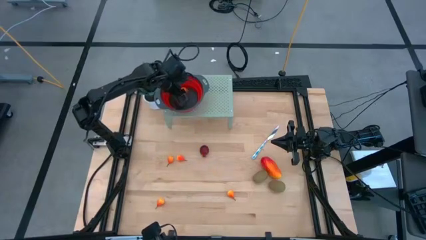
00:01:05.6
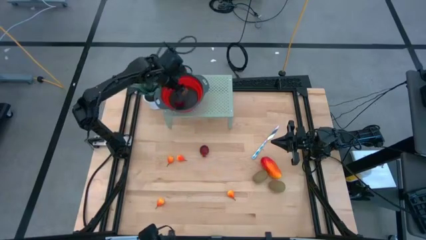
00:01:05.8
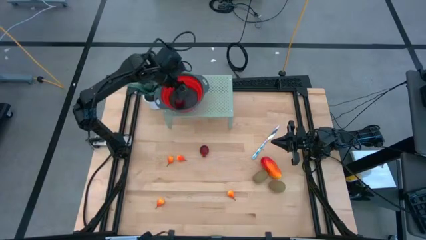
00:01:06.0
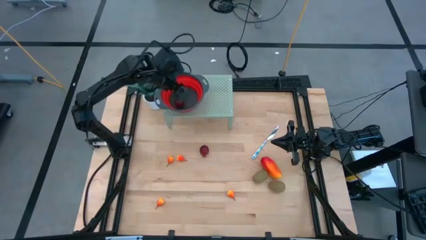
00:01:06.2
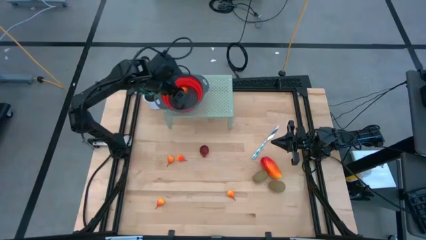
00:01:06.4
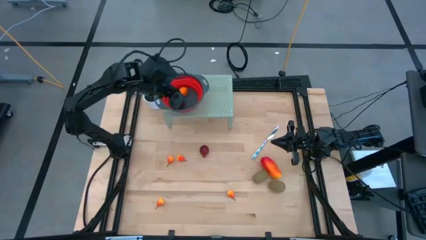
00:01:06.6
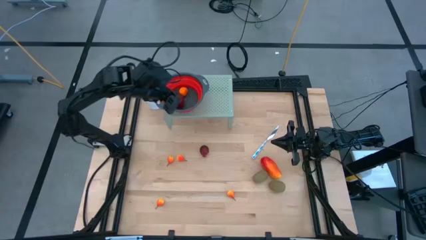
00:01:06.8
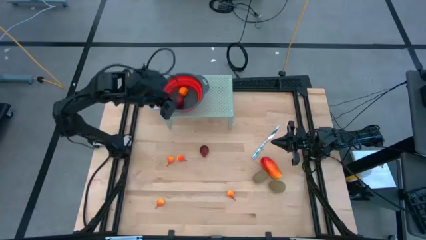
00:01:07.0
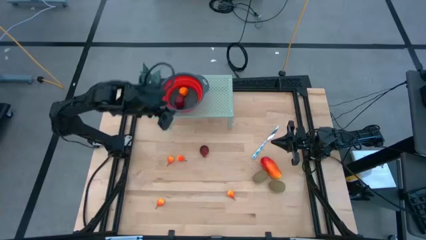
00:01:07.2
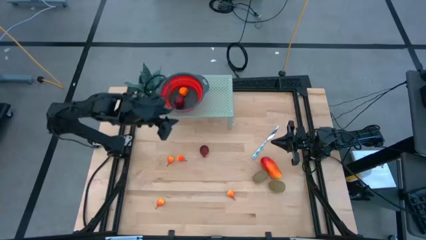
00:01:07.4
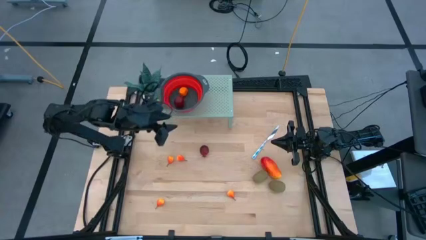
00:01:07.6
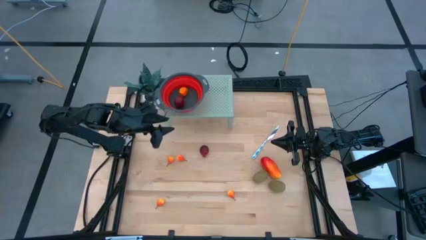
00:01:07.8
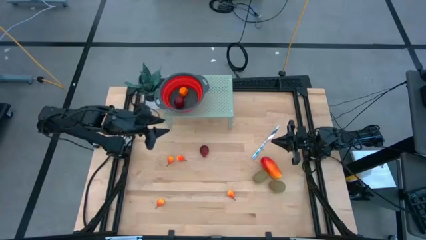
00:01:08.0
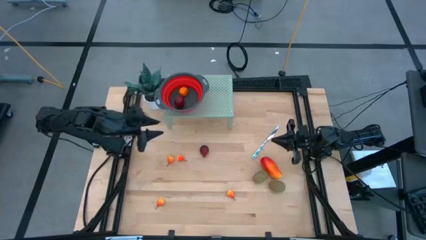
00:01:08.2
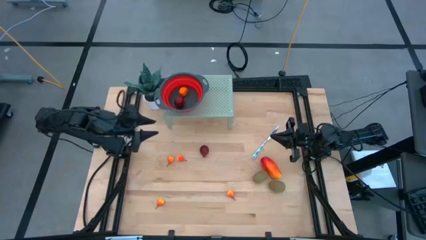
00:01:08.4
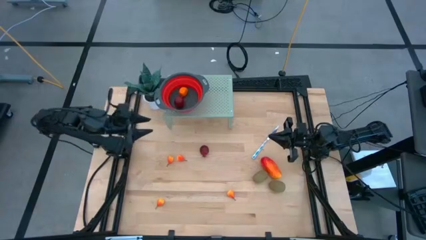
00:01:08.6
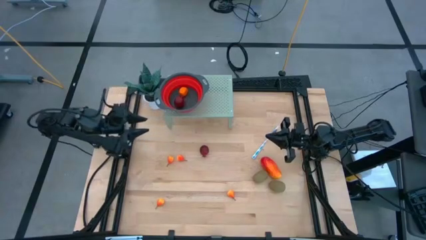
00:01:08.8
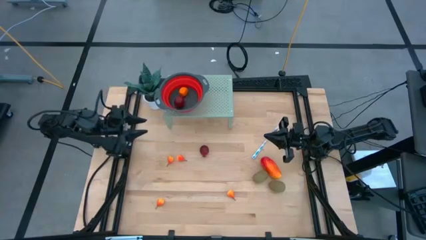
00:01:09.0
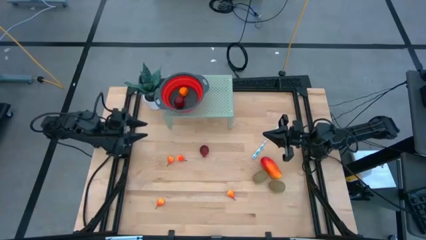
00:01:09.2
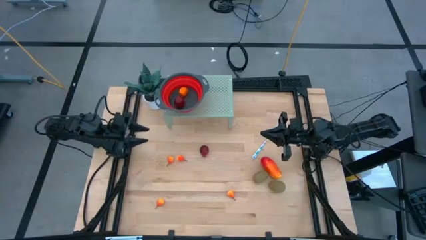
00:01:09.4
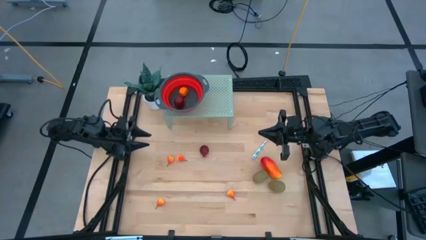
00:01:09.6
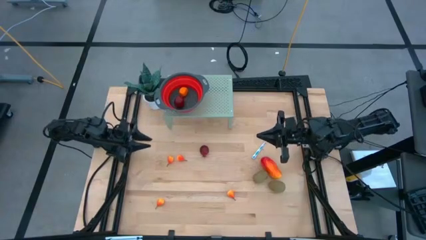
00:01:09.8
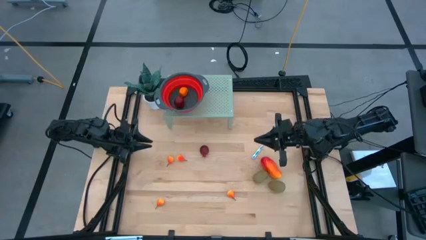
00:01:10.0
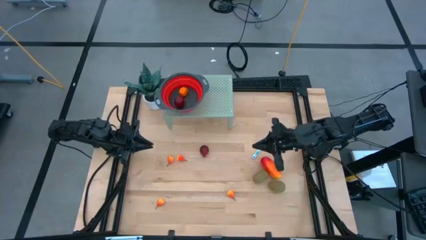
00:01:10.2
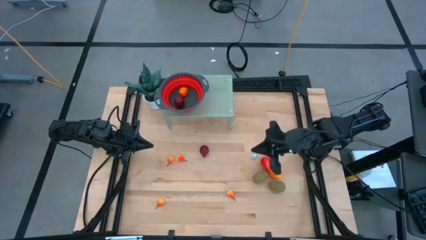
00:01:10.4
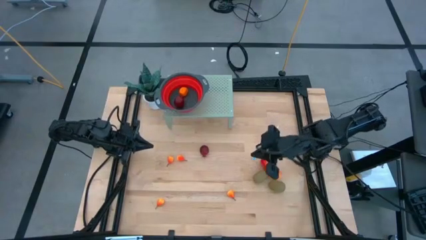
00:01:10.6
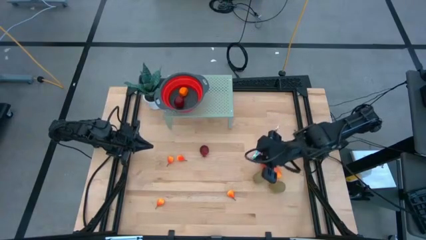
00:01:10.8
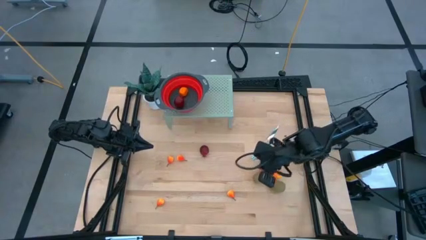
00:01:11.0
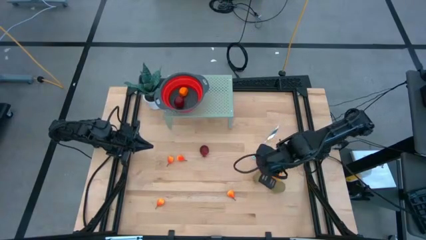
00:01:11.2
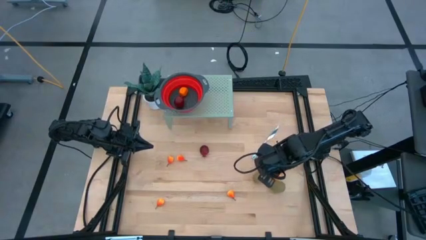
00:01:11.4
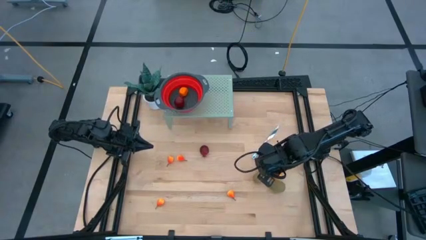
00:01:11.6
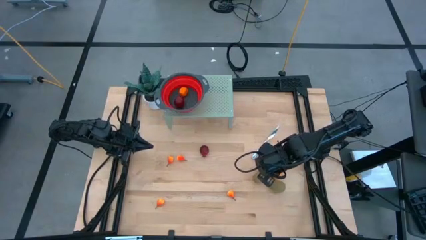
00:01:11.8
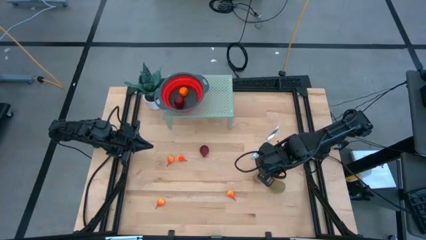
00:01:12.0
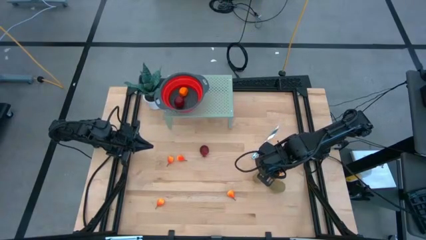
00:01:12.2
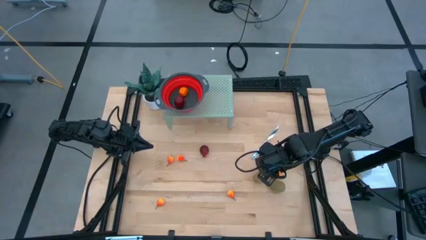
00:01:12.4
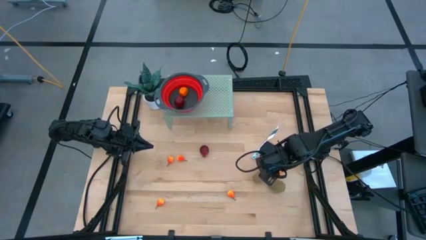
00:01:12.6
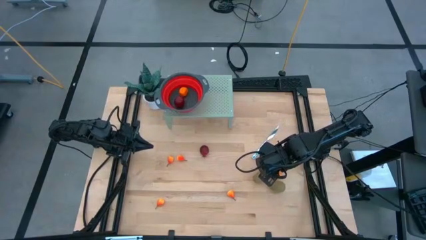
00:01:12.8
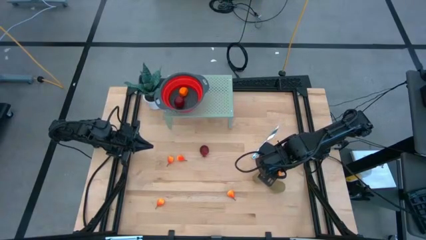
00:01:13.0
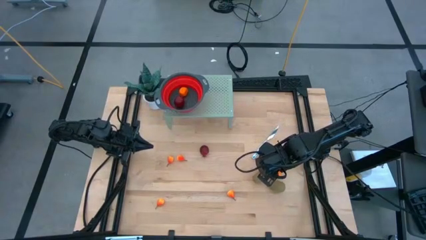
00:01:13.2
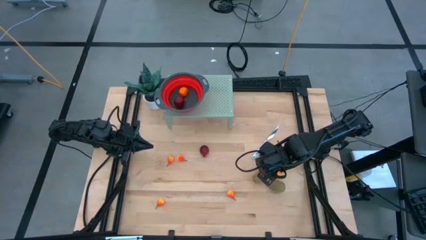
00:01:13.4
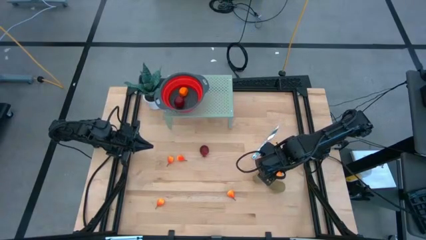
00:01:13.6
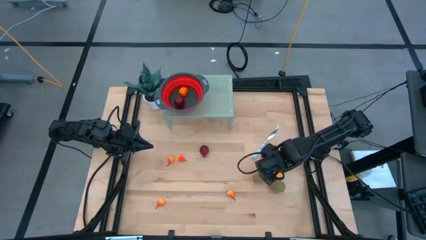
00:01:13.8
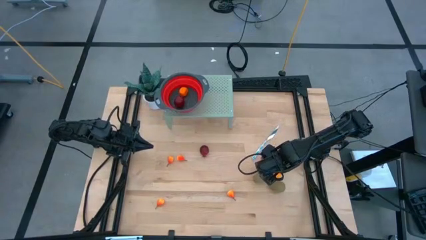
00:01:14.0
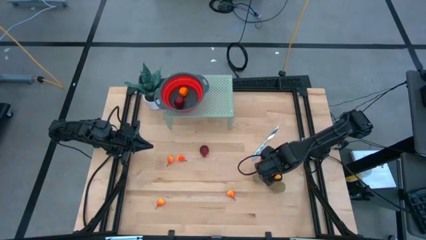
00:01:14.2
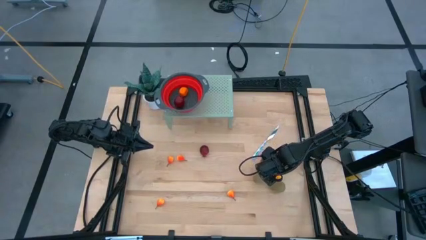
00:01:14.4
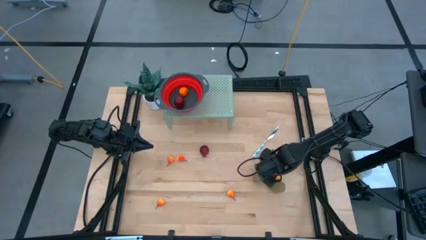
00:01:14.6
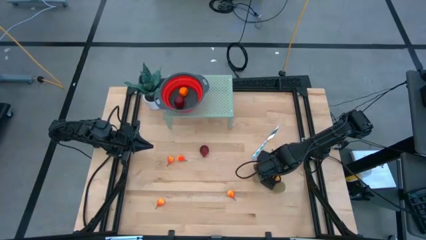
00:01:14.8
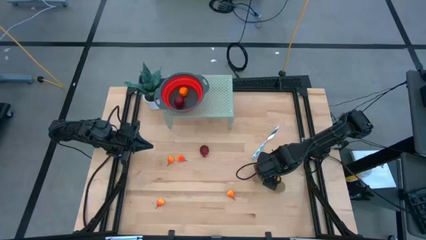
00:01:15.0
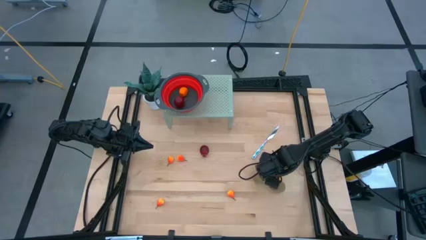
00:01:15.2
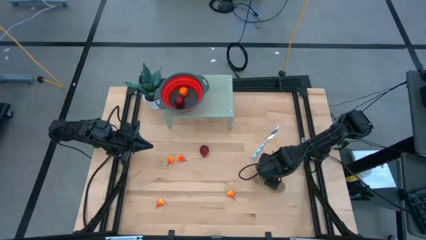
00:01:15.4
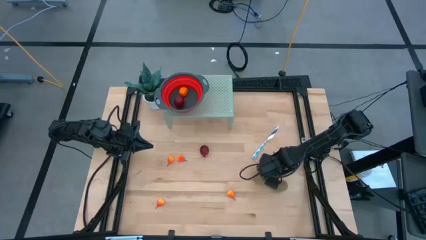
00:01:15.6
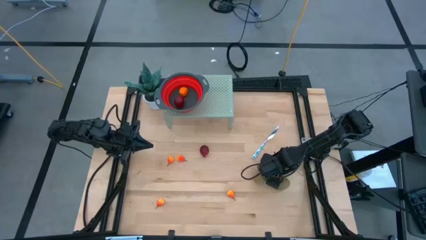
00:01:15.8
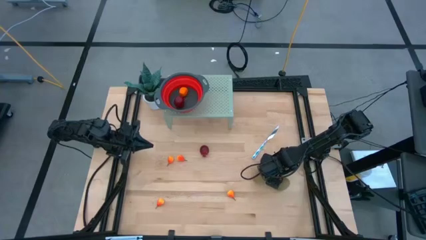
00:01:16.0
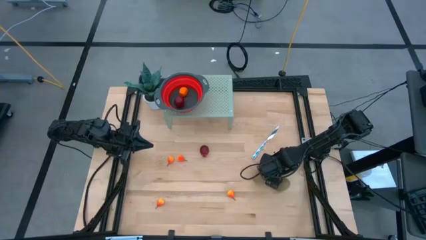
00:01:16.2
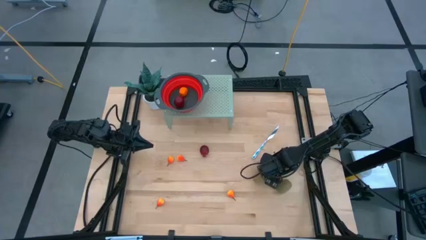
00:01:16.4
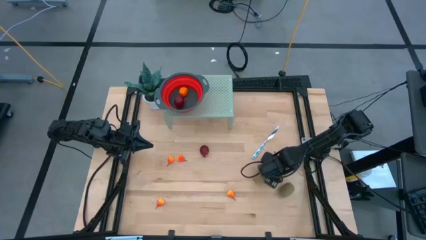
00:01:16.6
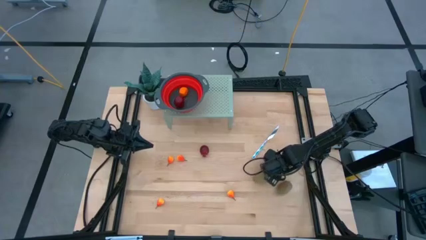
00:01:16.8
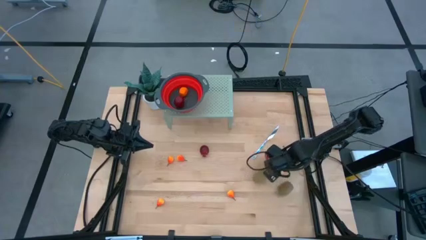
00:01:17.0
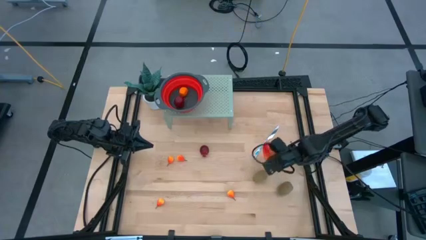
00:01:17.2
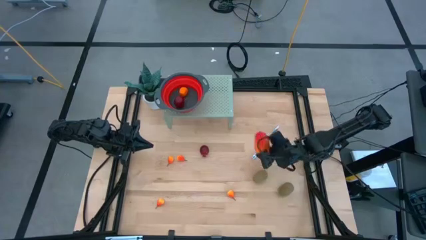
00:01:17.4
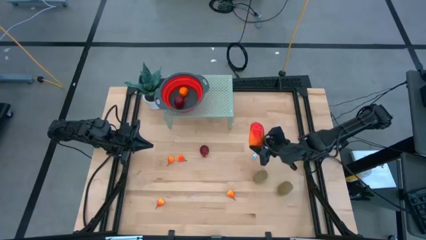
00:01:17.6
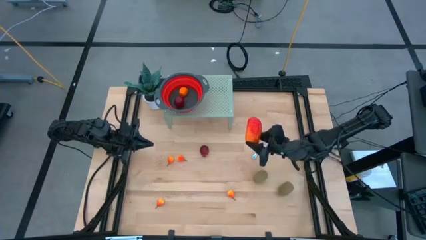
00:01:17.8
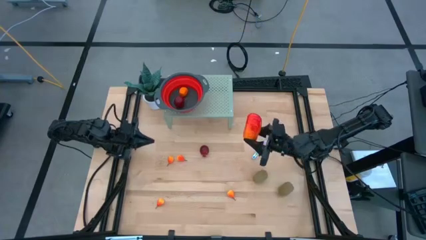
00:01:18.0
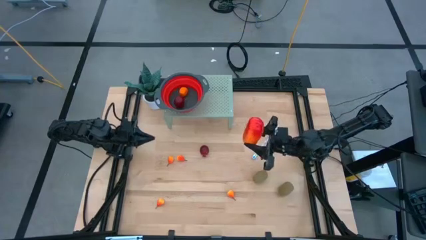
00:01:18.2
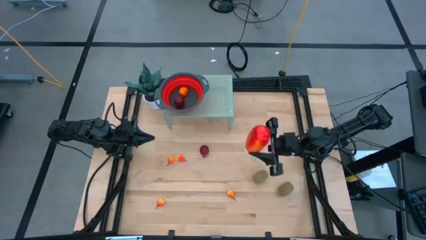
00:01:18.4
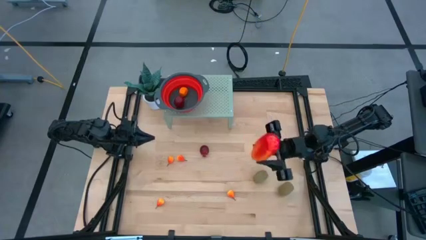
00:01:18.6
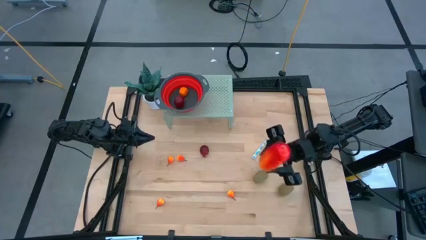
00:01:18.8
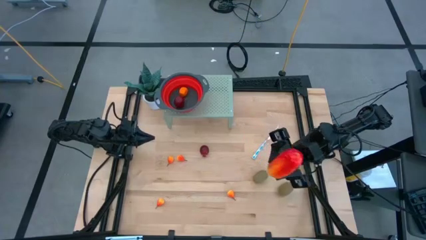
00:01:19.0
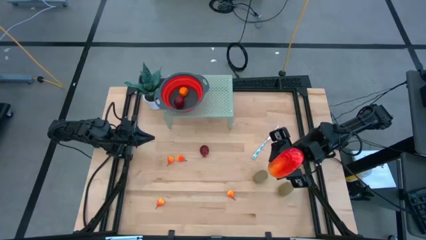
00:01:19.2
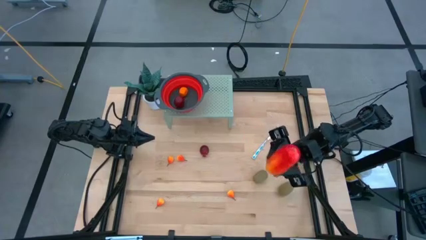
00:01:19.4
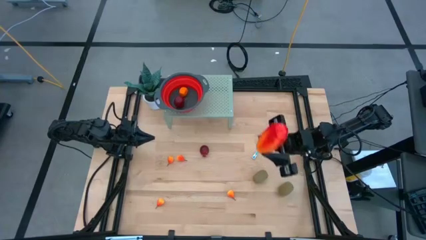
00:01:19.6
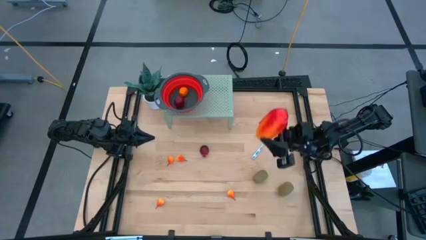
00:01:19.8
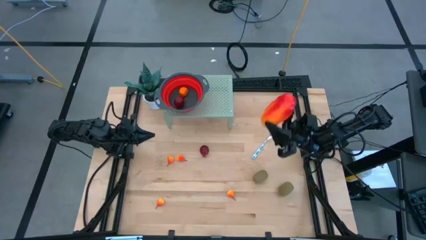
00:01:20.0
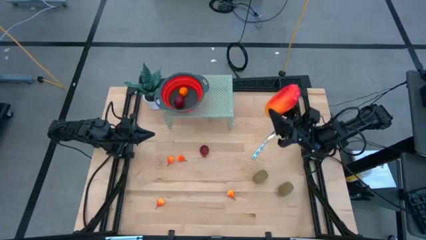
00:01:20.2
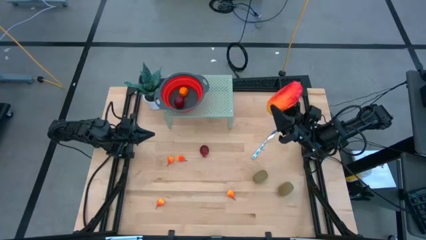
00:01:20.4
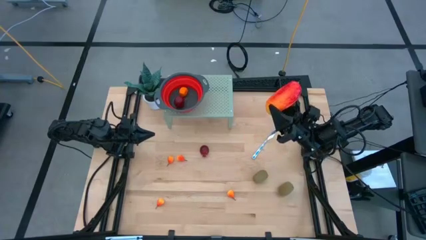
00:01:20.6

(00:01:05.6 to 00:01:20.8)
Task: Pick & Place Fruit
Put the mango into the red strainer bowl on the shelf
